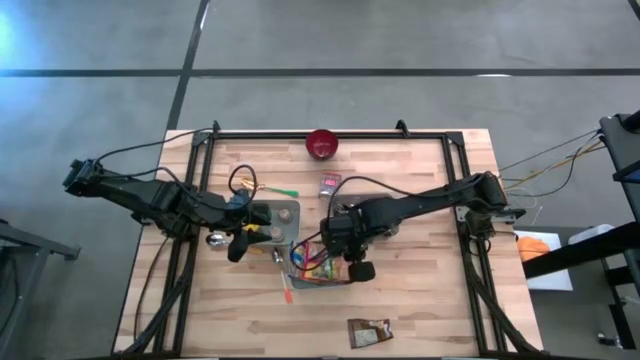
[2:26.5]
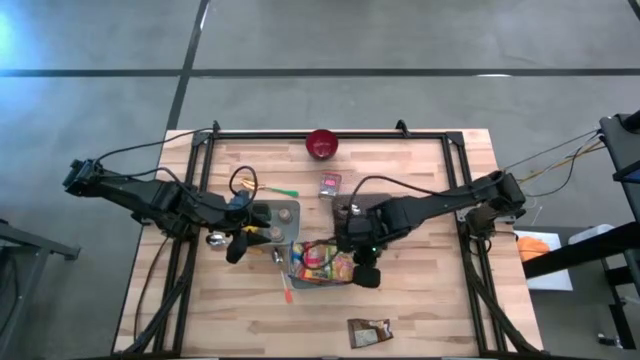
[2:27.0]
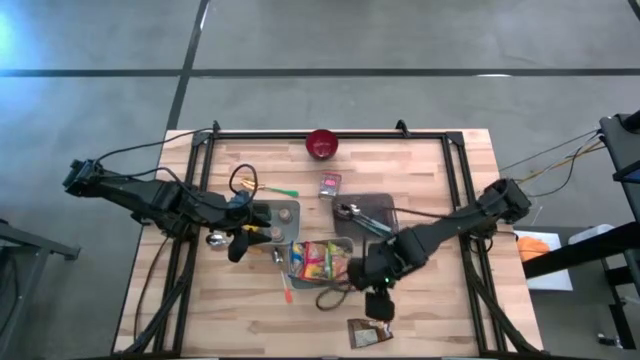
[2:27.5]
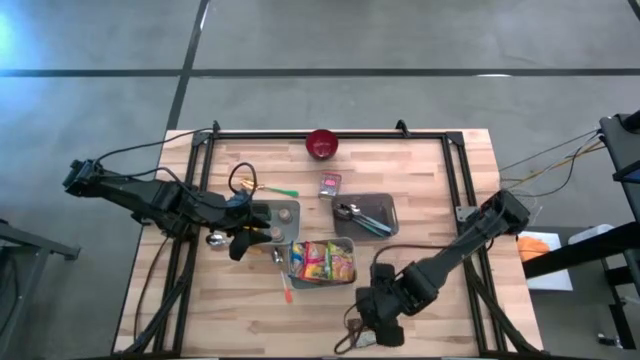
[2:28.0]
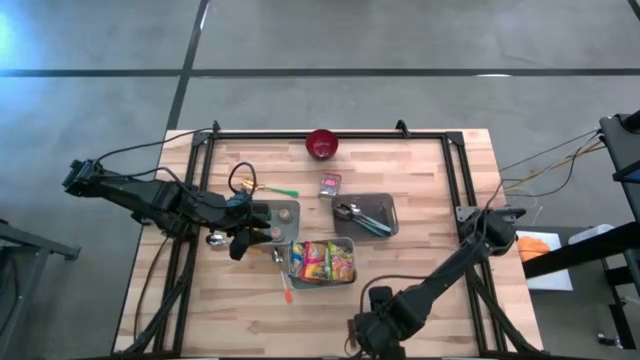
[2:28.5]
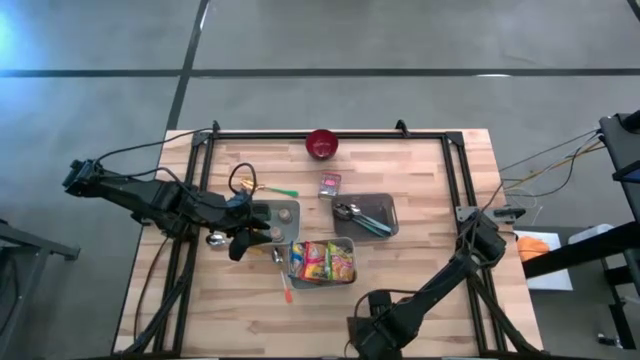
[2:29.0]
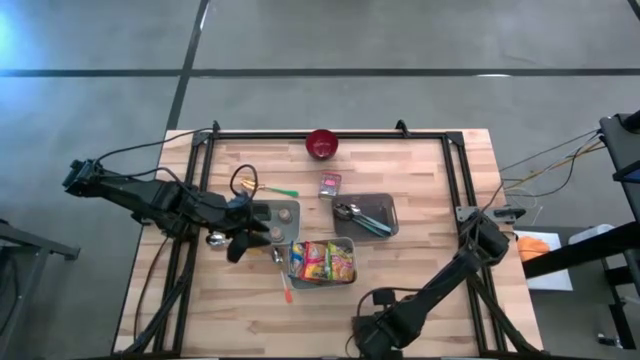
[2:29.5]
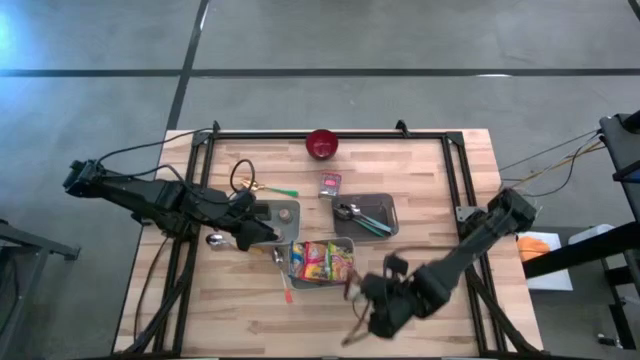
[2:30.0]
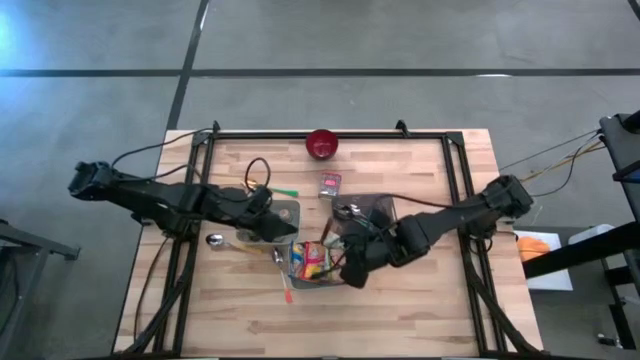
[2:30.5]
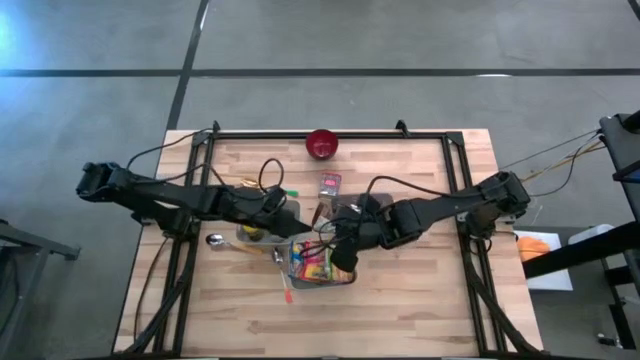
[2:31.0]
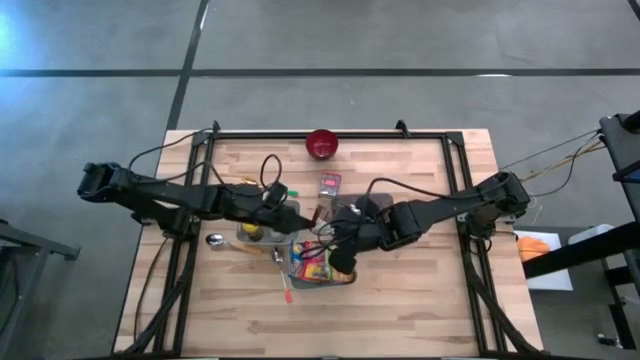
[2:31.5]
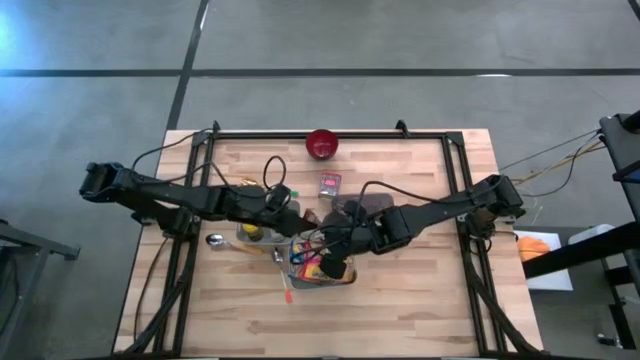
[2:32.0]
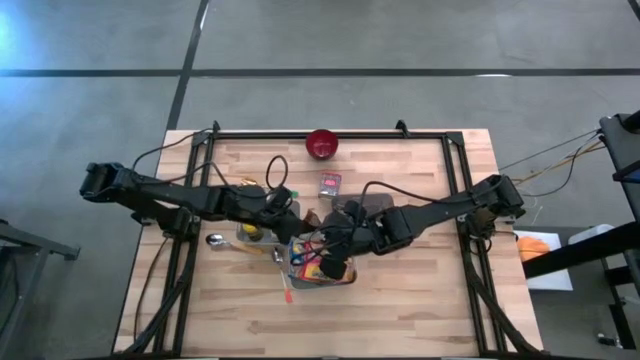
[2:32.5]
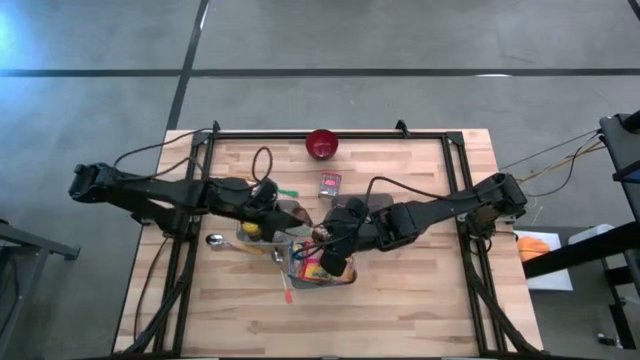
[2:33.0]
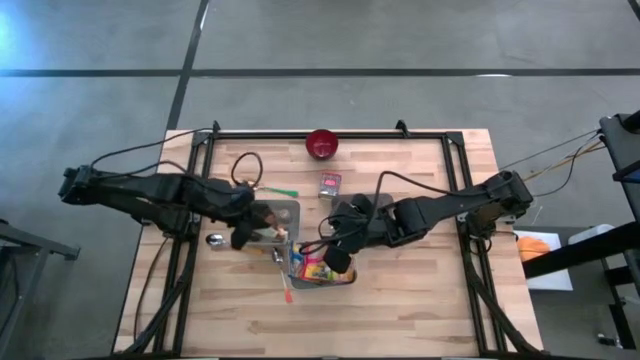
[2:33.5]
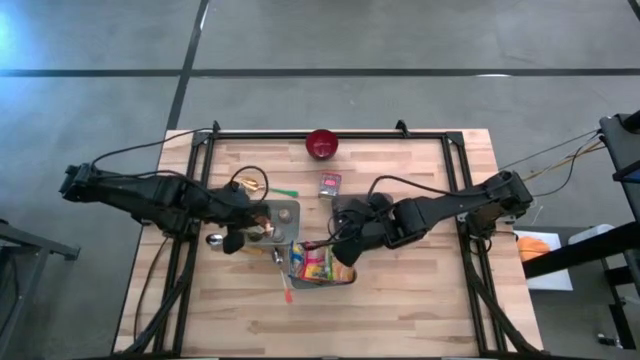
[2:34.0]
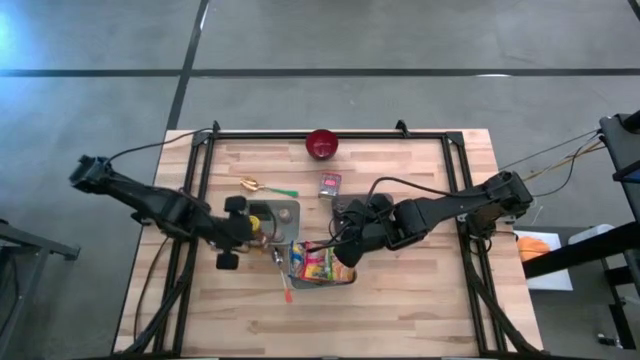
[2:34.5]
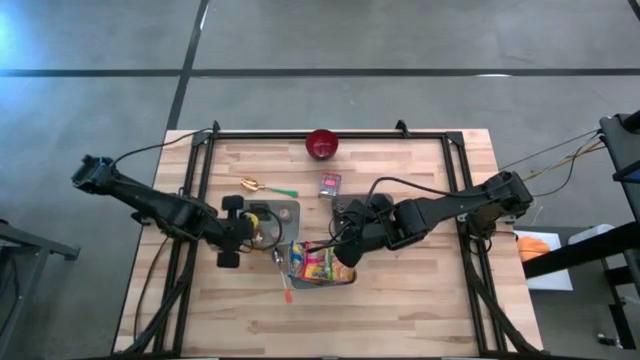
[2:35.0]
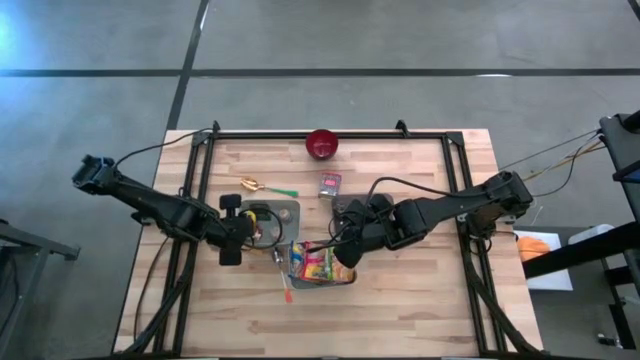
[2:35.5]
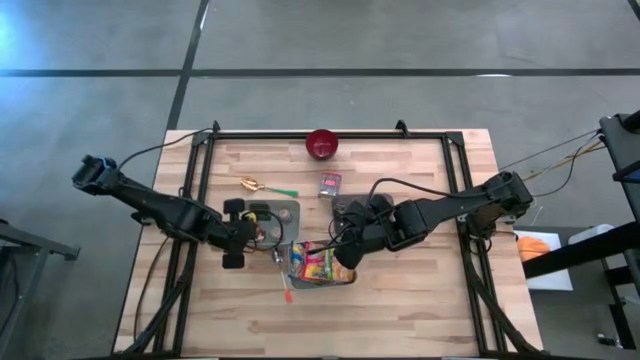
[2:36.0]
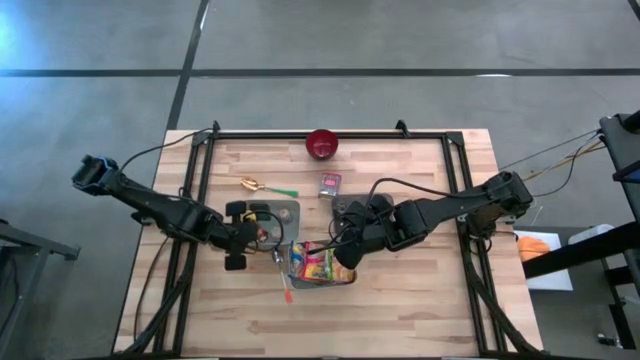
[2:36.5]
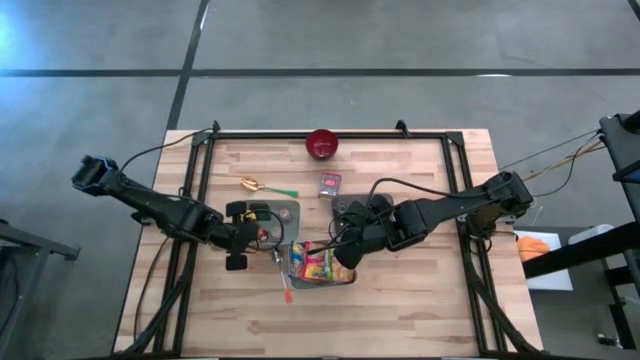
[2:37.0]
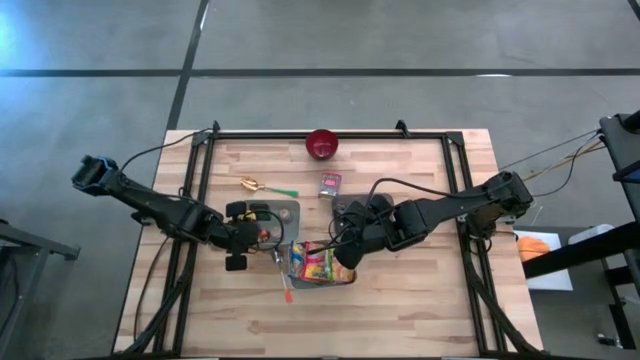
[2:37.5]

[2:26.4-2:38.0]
Put the orange seasoning bag into the top gray bin

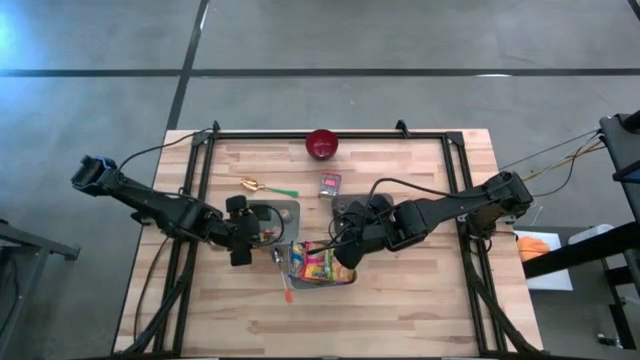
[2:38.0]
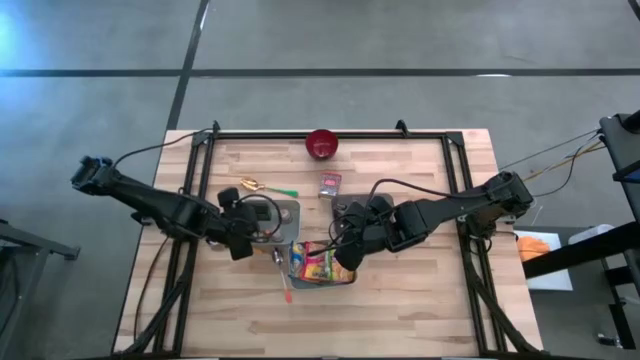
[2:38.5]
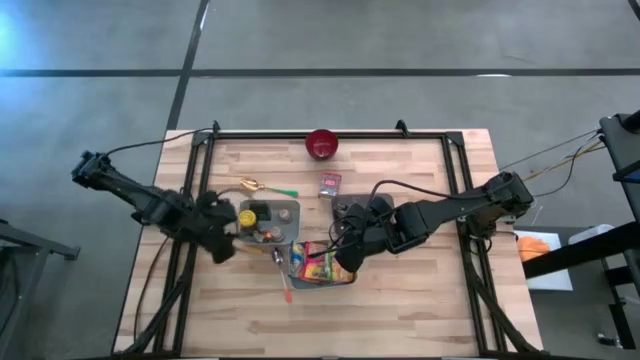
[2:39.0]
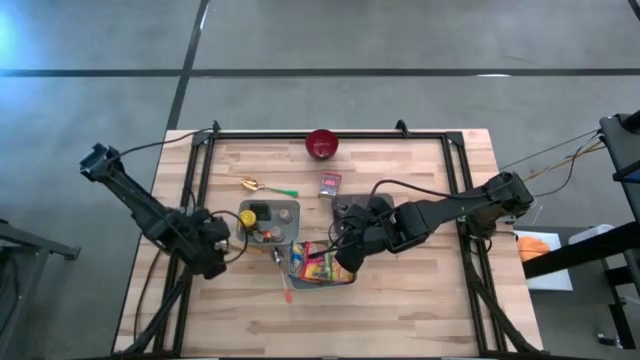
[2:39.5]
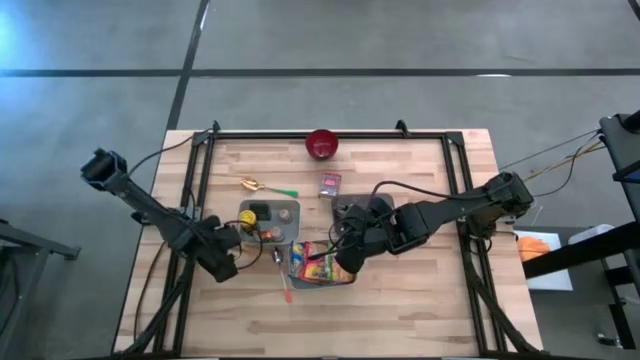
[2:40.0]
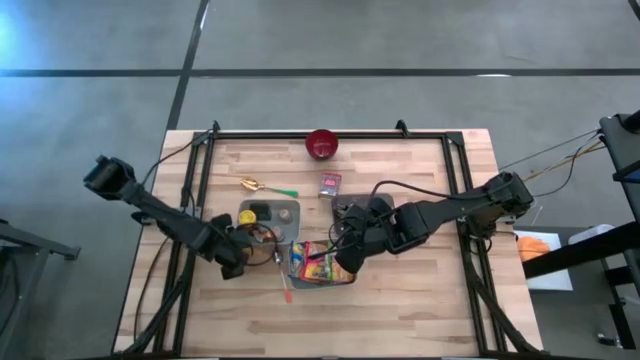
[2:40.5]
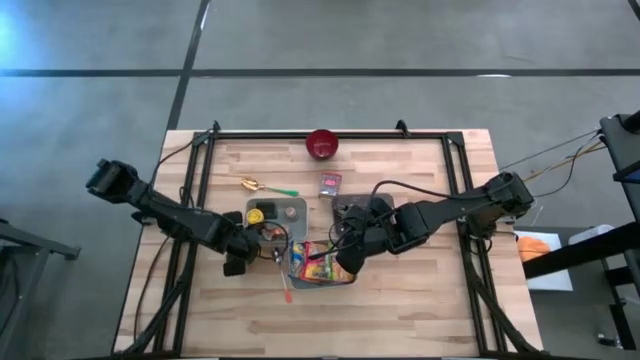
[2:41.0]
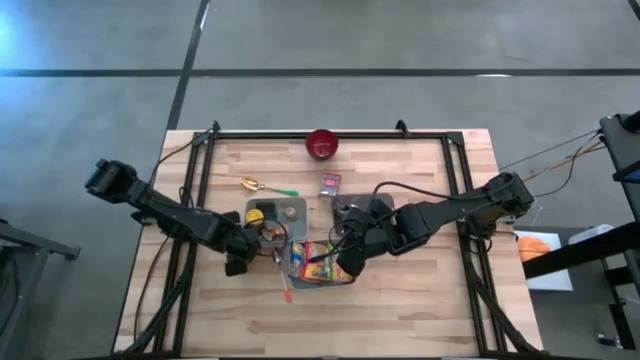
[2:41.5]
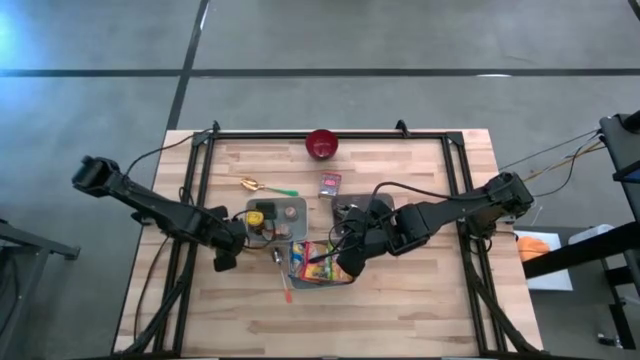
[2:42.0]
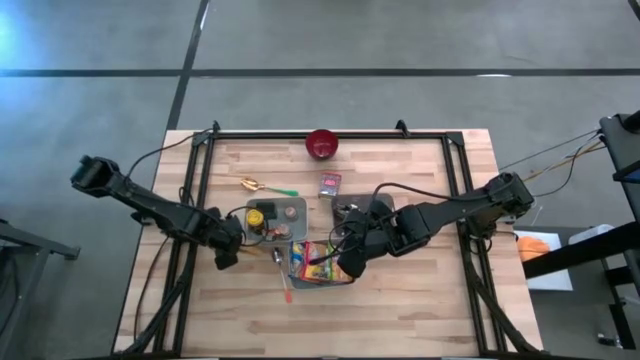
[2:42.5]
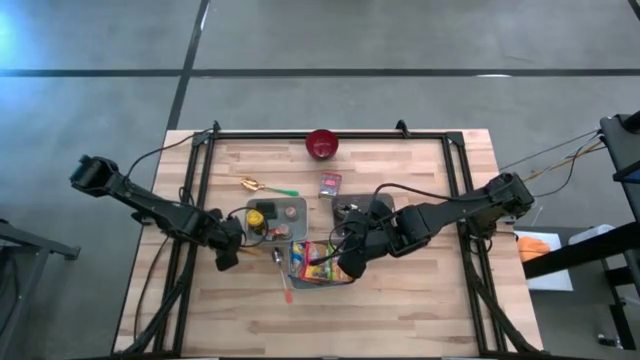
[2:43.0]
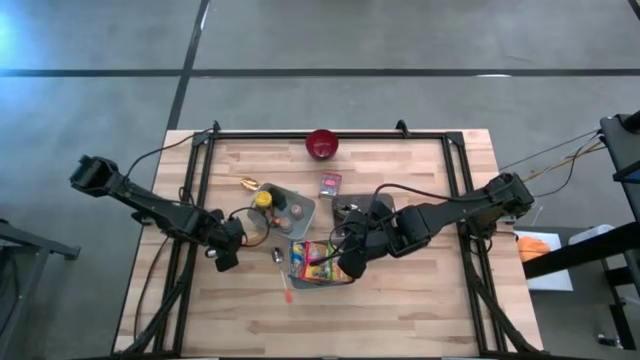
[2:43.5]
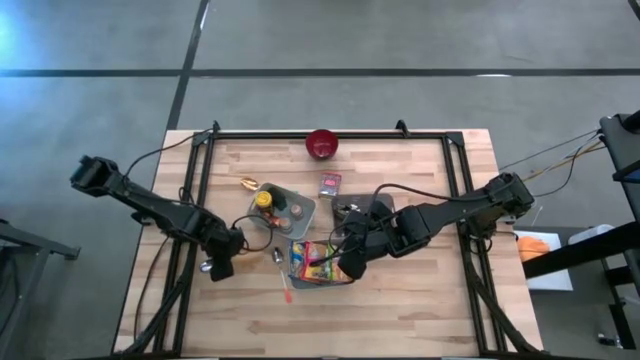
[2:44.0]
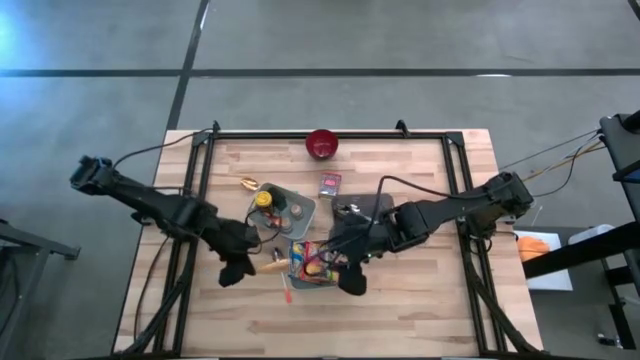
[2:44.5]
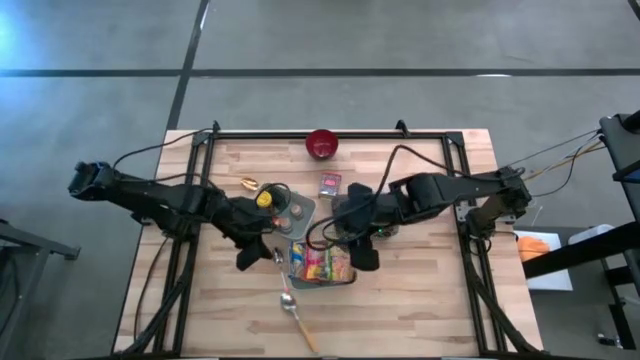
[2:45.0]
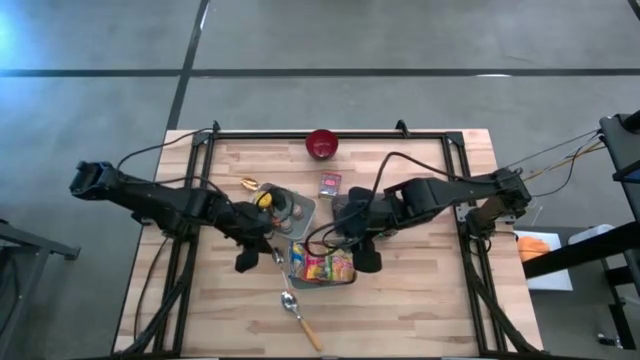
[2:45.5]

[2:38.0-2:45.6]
Put the yellow spoon into the black bin
